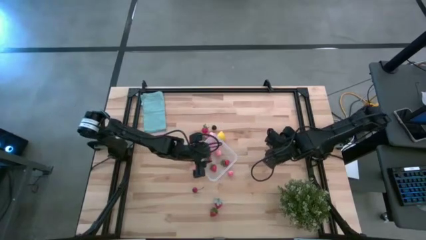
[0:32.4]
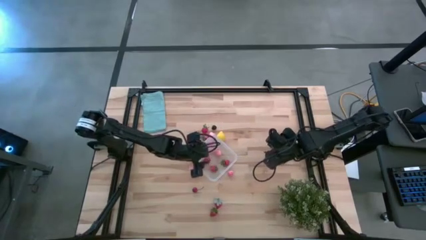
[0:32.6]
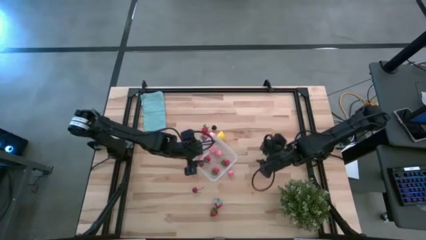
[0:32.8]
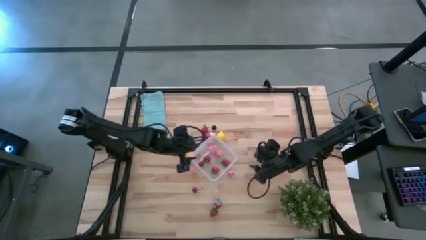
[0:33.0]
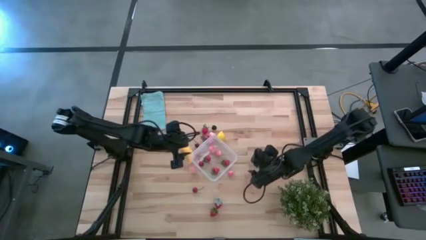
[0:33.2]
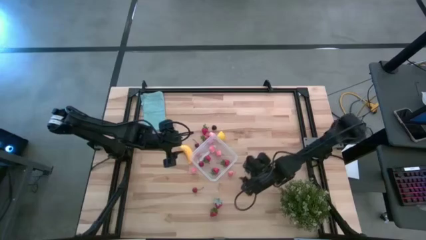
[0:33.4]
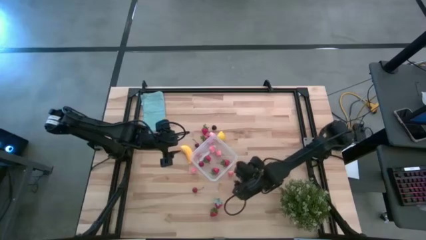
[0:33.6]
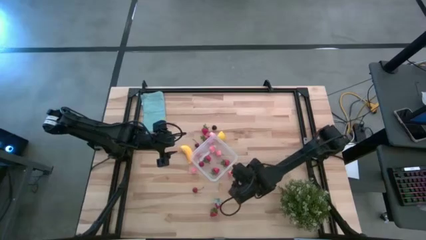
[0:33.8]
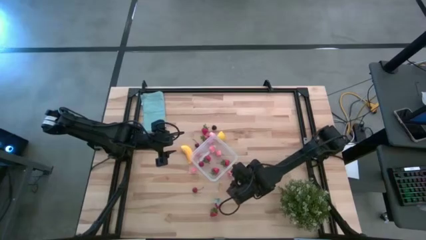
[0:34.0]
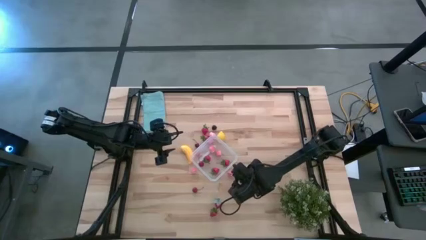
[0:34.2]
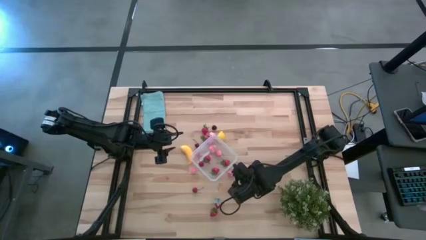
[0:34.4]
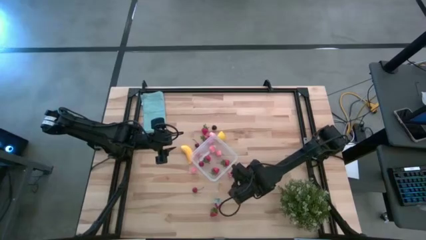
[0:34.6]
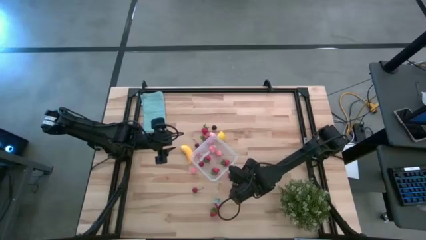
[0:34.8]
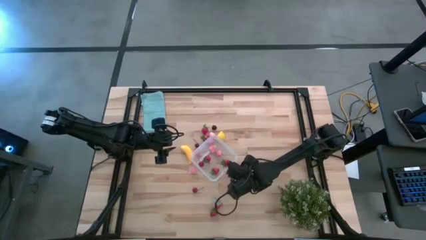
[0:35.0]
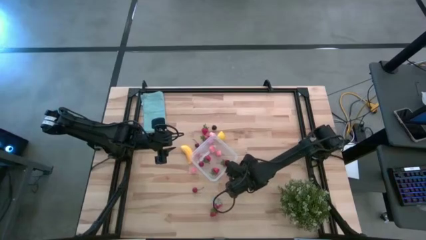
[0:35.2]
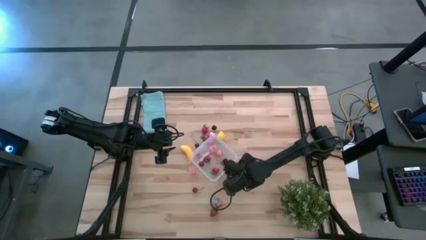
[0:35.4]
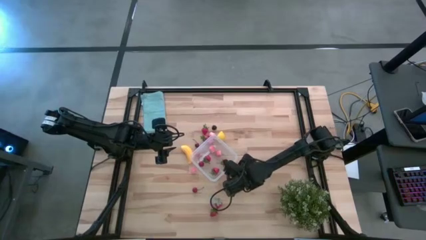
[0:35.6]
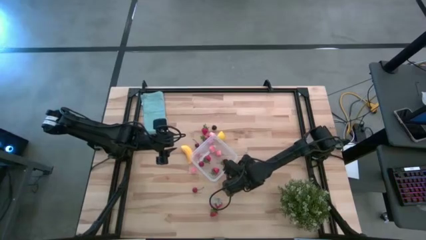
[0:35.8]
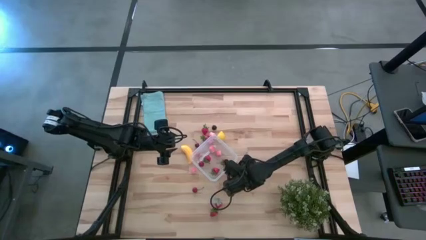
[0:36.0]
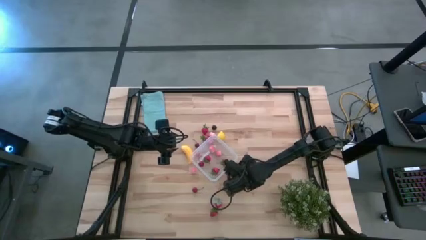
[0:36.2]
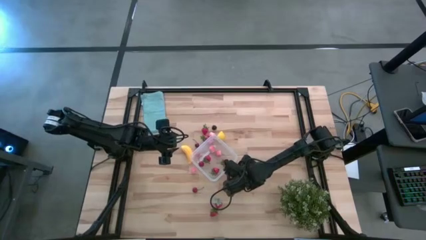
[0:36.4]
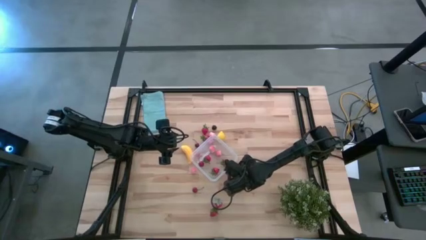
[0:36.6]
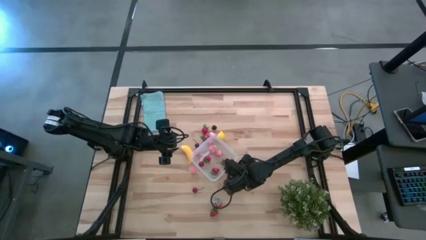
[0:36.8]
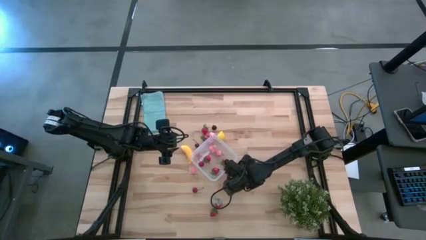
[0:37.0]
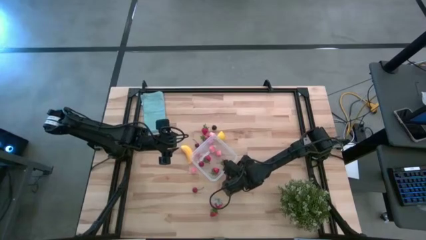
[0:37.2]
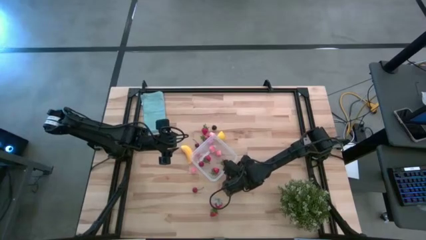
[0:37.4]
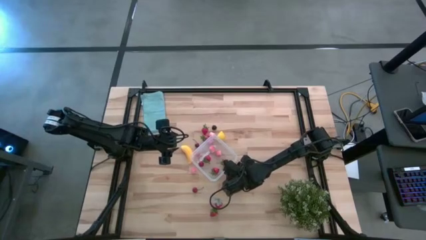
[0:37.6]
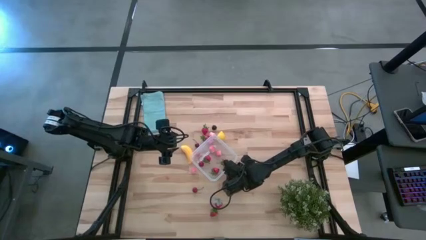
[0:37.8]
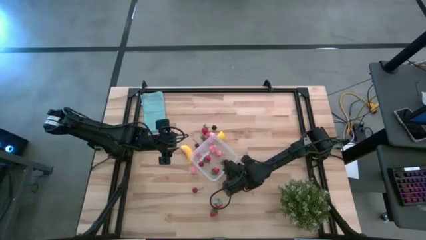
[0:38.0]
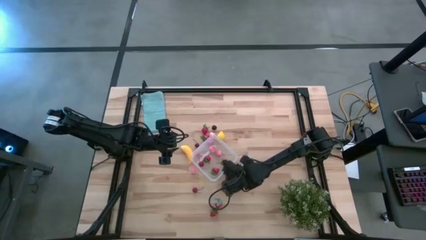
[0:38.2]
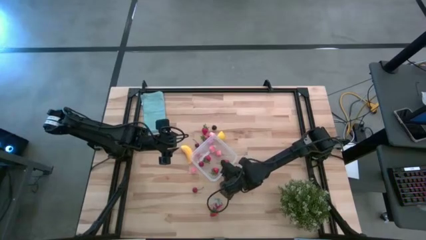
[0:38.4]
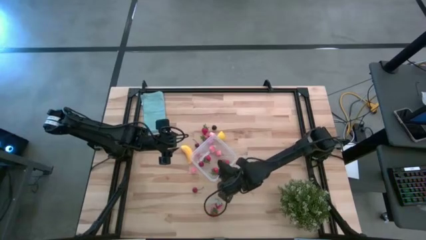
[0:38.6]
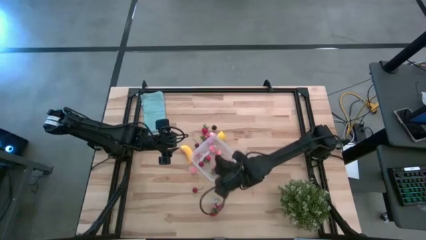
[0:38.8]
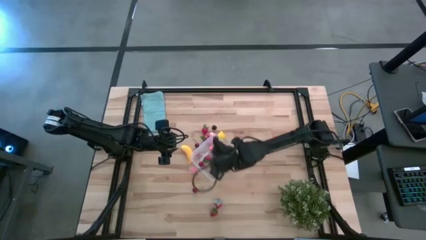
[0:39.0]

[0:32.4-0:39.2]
Task: Pick and placing Produce into tupperware
Put the pink peach into the transparent container

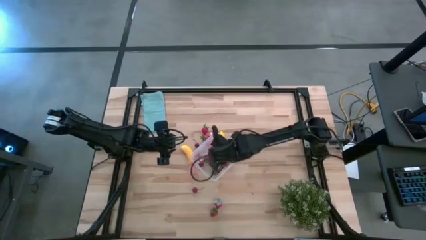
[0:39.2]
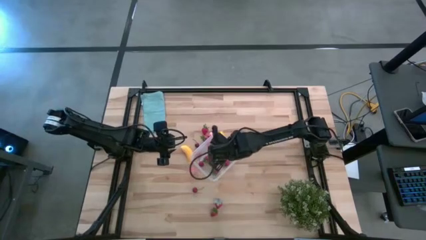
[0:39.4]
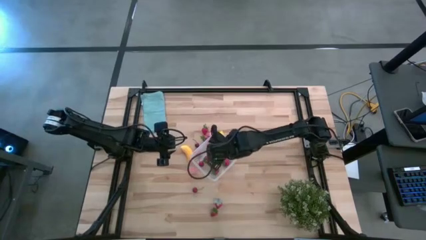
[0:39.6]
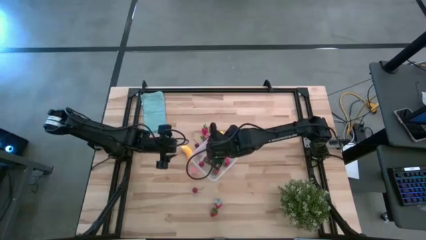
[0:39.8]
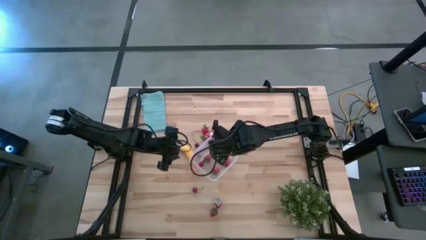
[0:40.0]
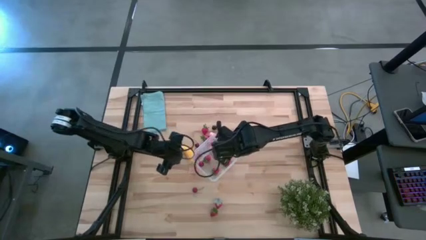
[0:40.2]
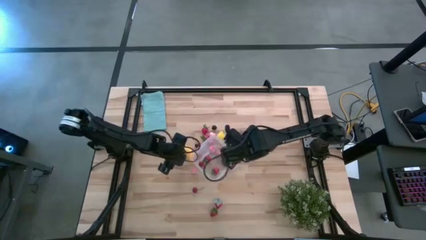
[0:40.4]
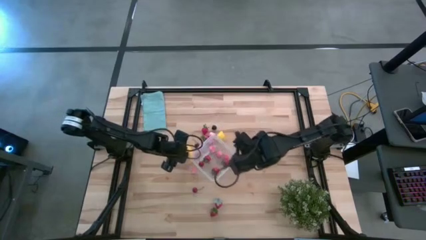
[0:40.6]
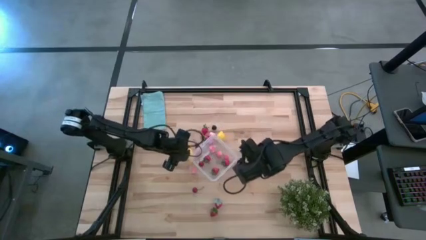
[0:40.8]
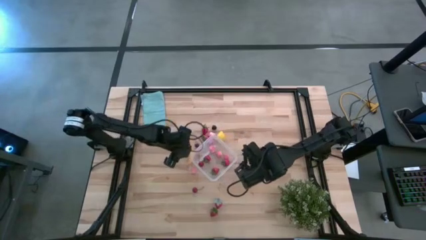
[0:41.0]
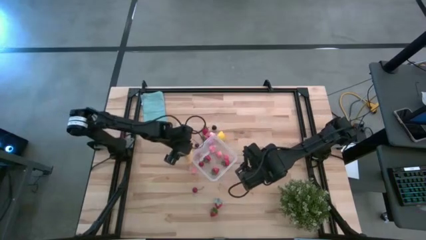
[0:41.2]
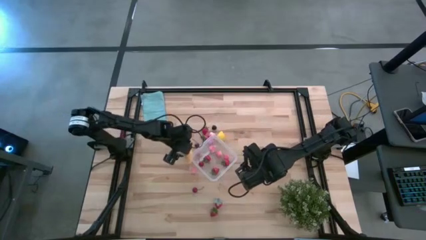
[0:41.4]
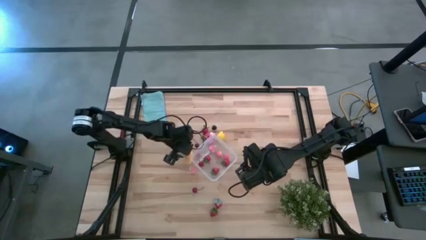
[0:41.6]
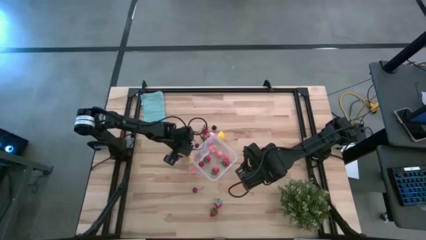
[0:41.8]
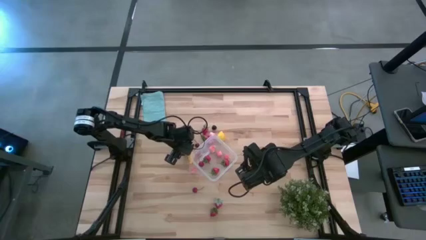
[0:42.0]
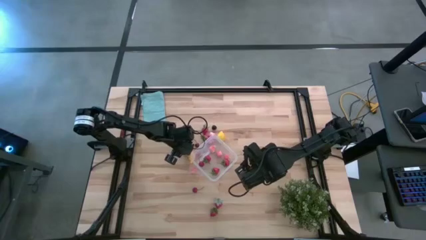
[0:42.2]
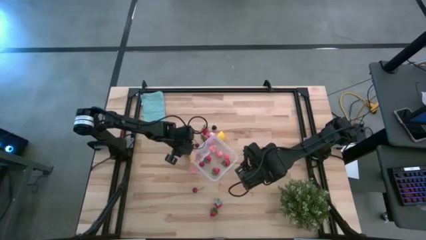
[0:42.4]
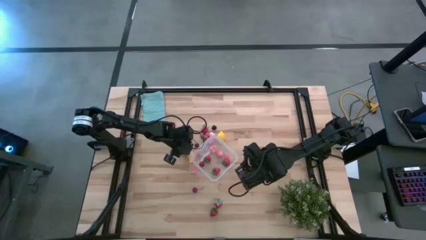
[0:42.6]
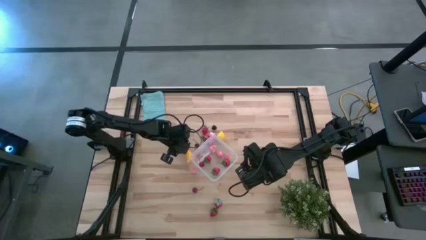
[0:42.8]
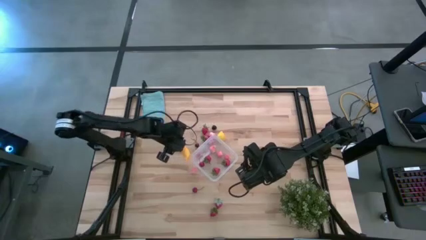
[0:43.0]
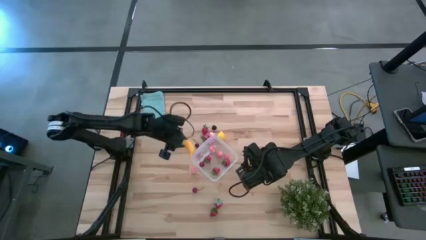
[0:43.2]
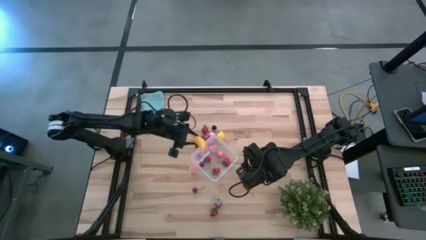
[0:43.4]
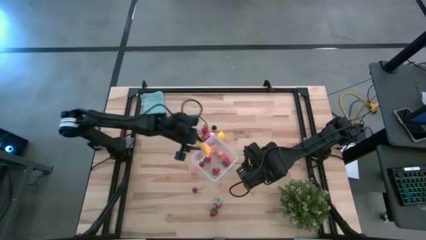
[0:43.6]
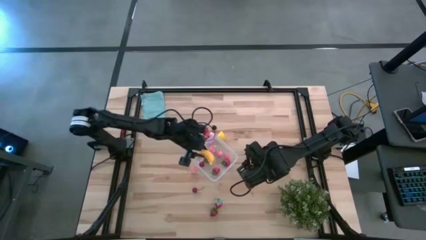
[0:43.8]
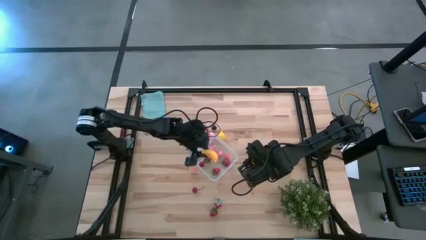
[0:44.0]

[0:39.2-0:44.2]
Put the yellow banana into the transparent container

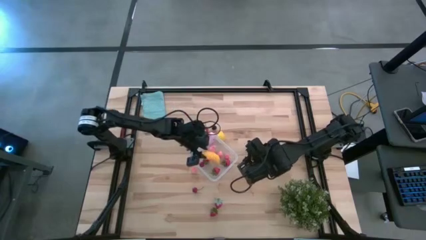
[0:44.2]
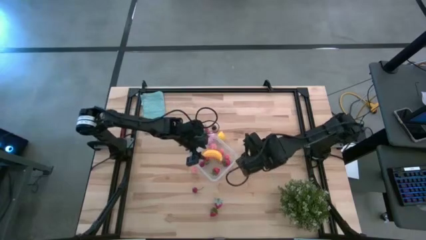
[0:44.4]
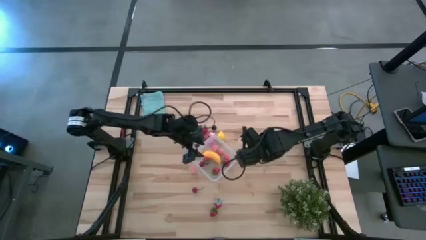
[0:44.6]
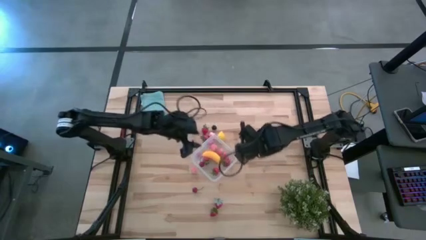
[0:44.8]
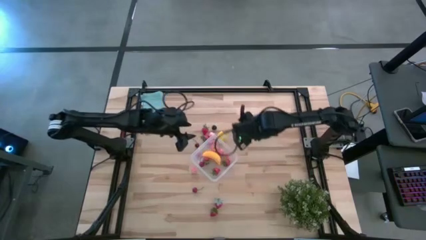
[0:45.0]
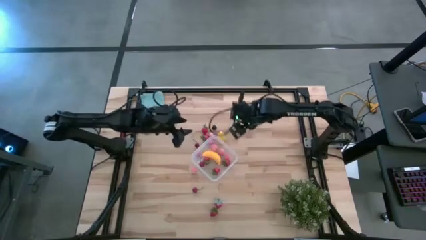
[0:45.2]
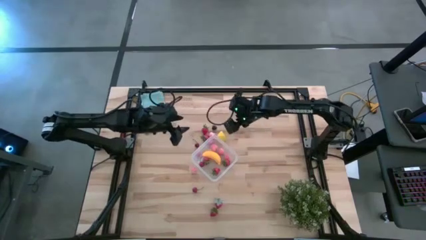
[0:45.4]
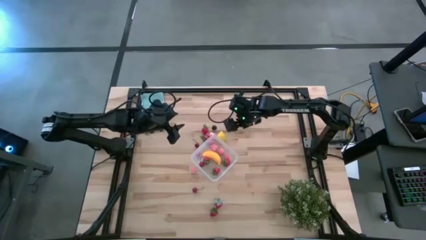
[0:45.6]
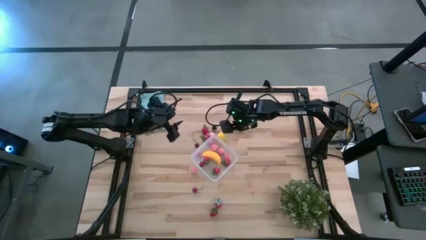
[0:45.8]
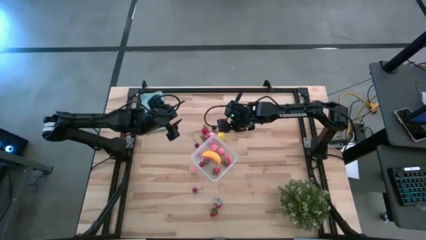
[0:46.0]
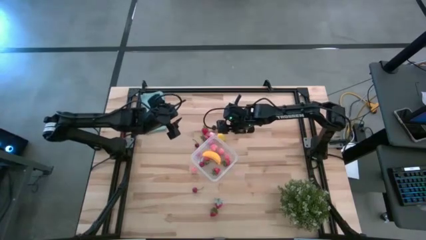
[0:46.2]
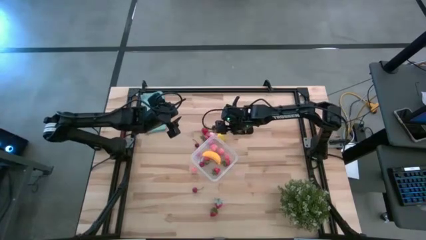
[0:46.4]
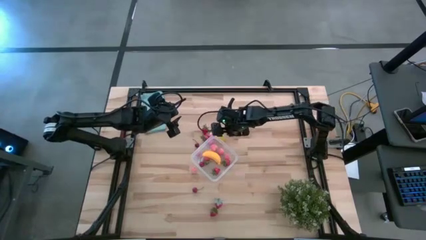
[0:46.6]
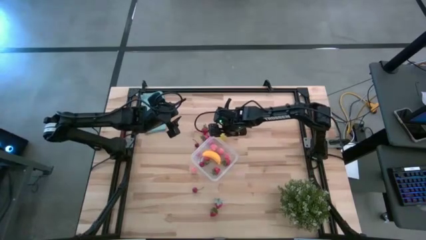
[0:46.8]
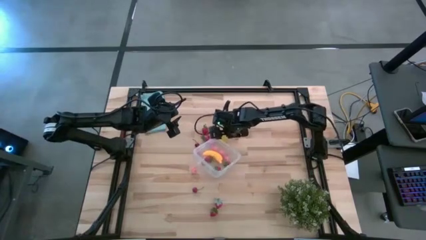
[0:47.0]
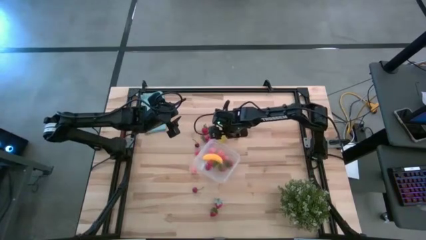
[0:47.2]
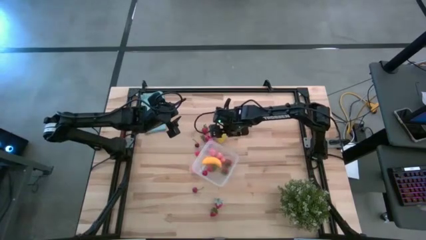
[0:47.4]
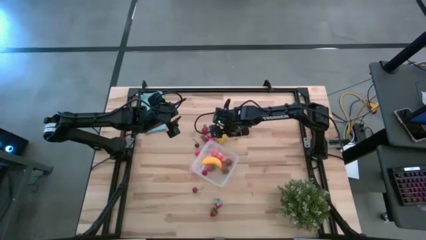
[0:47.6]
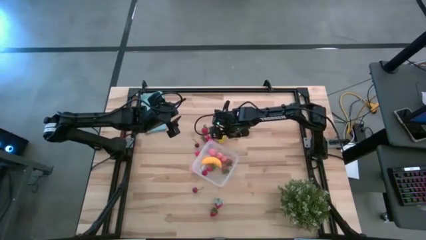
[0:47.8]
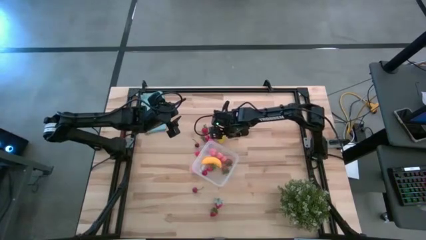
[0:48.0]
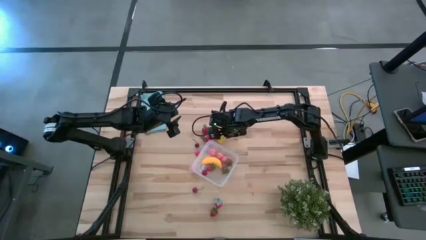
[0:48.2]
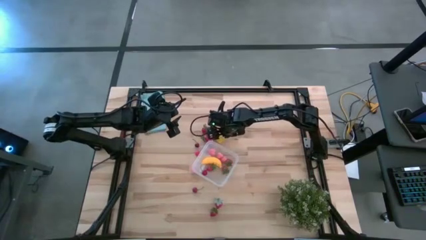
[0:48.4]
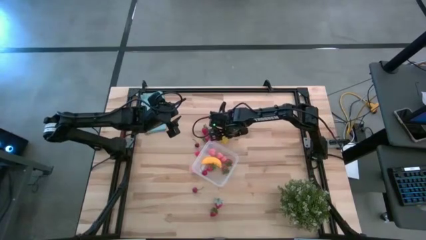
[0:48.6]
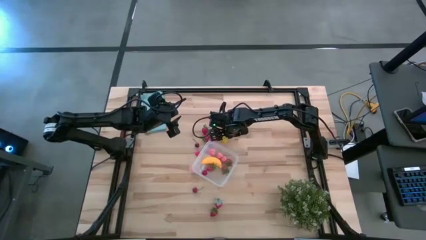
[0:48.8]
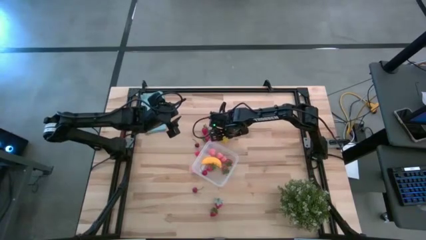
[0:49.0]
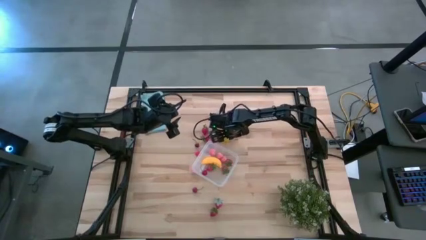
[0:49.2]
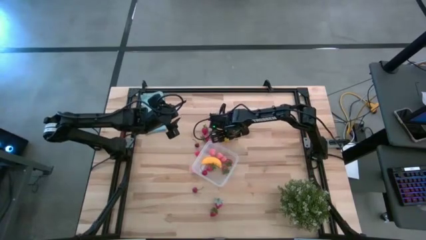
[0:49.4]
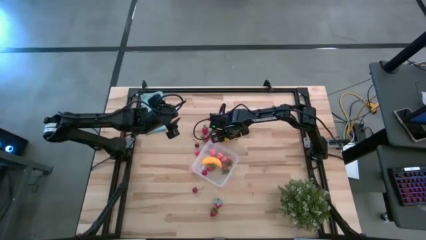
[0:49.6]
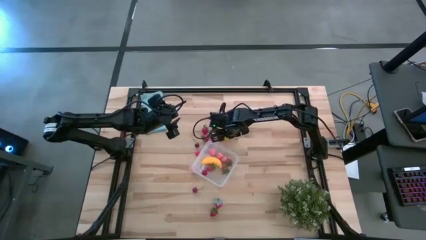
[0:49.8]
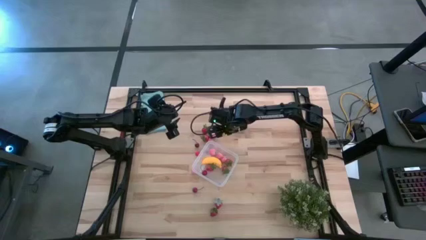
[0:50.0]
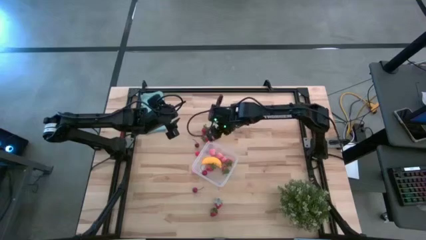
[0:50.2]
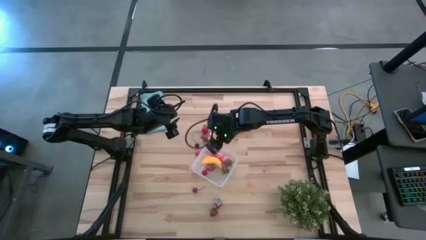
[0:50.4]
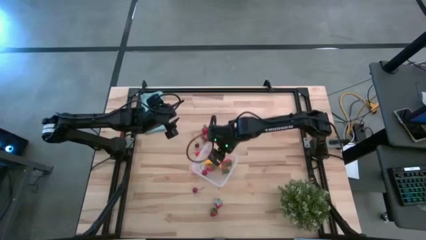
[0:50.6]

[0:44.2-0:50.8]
Put the yellow lemon into the transparent container
